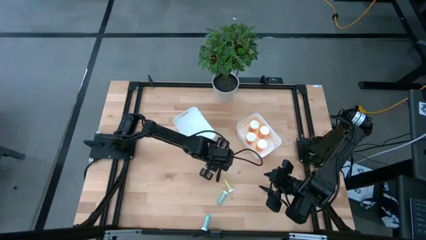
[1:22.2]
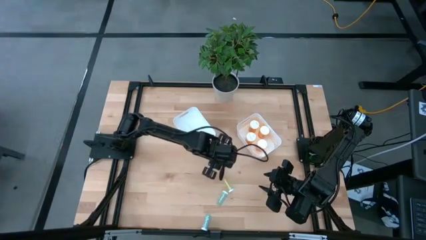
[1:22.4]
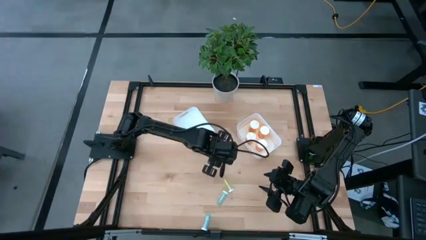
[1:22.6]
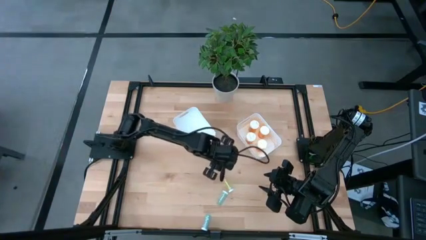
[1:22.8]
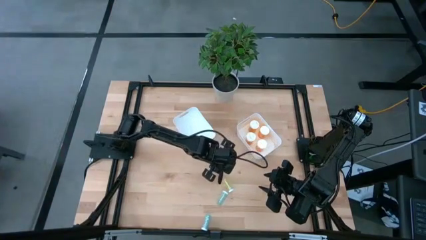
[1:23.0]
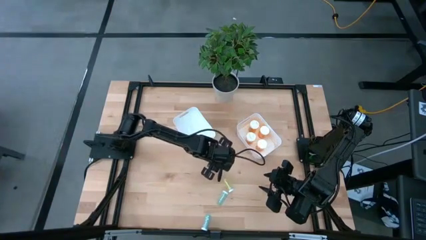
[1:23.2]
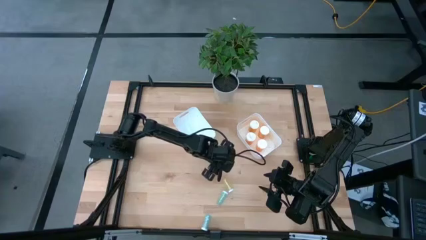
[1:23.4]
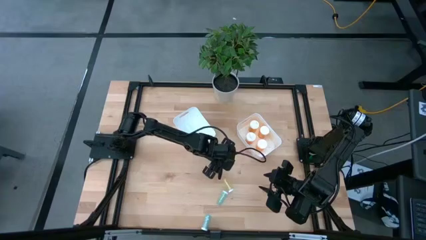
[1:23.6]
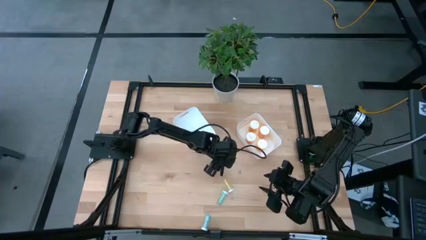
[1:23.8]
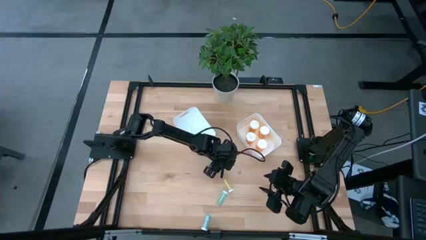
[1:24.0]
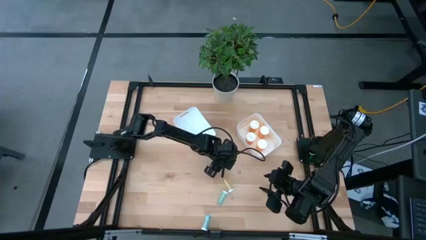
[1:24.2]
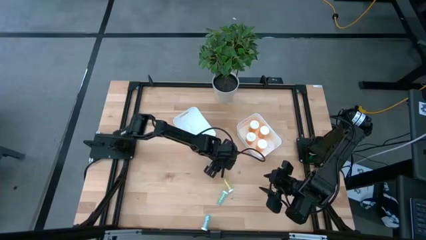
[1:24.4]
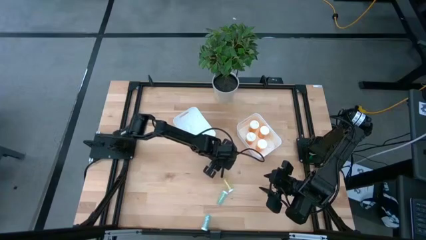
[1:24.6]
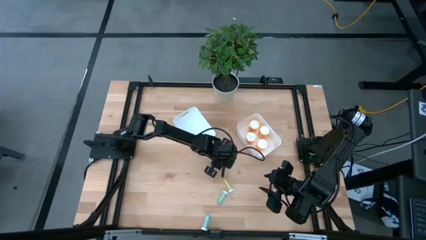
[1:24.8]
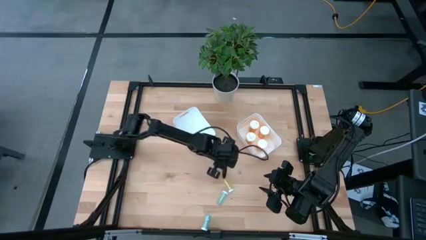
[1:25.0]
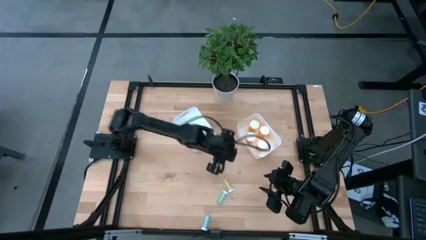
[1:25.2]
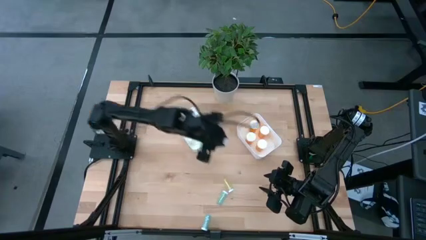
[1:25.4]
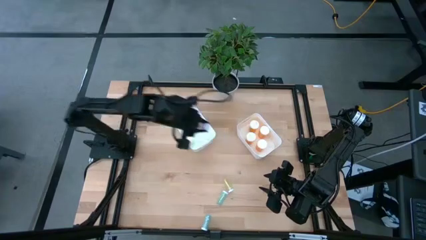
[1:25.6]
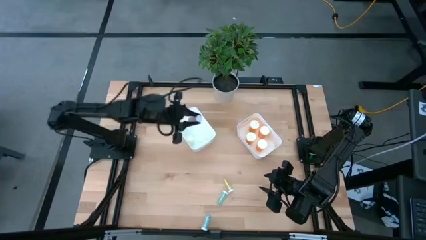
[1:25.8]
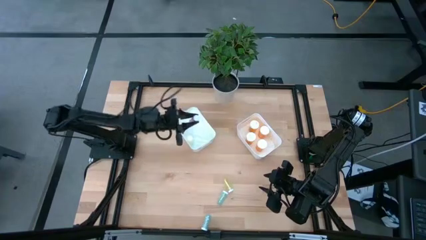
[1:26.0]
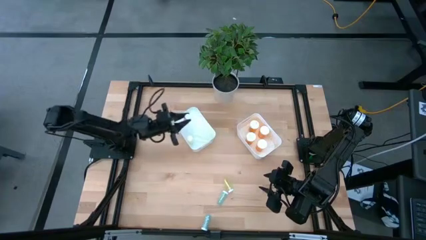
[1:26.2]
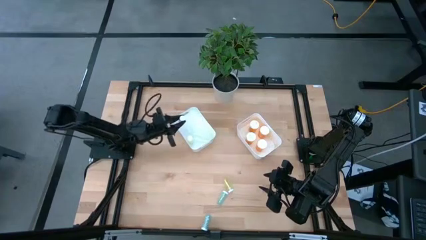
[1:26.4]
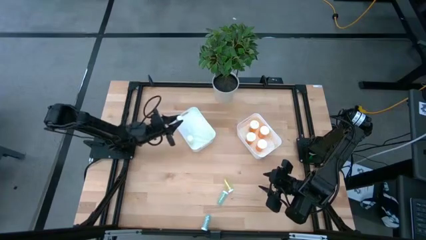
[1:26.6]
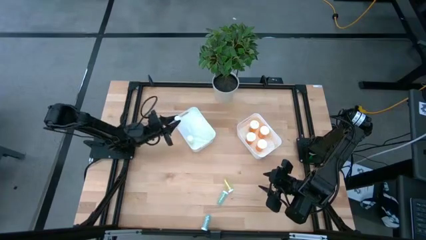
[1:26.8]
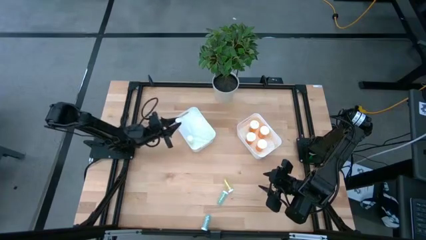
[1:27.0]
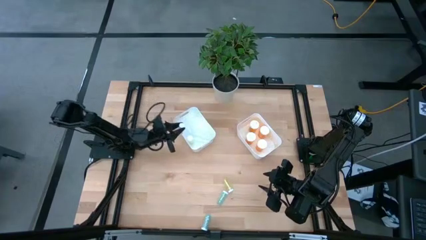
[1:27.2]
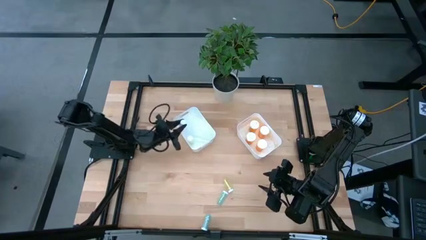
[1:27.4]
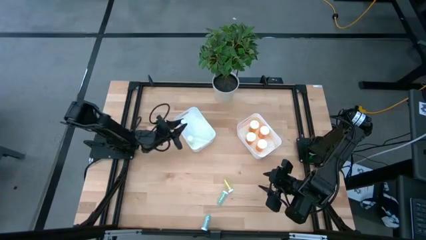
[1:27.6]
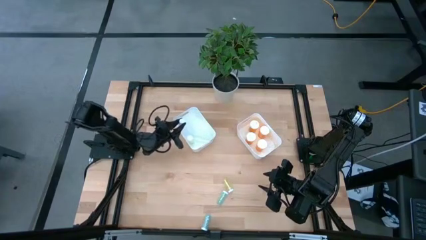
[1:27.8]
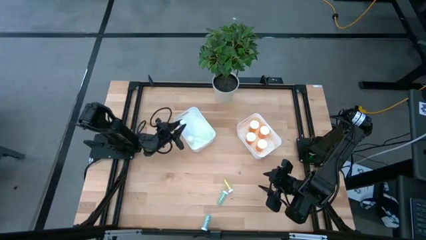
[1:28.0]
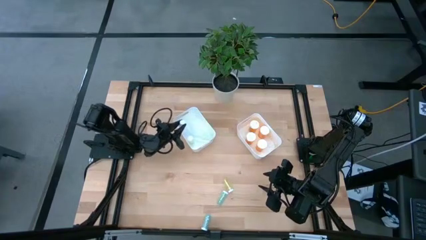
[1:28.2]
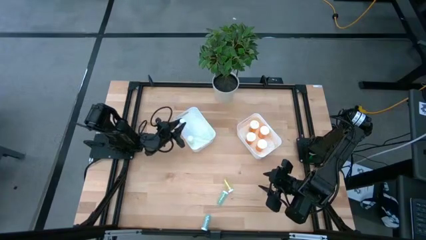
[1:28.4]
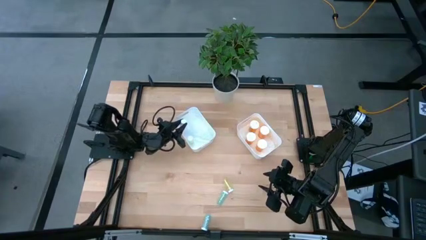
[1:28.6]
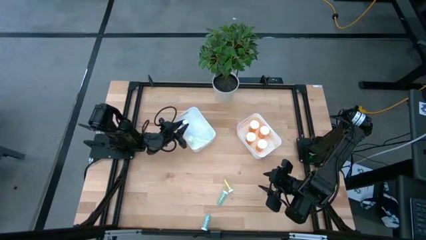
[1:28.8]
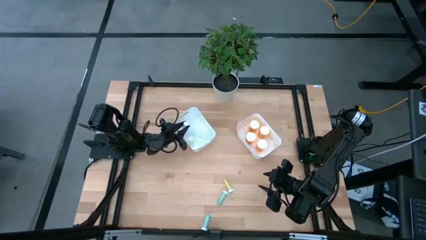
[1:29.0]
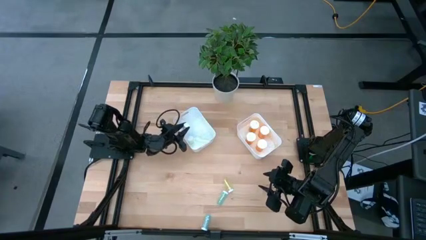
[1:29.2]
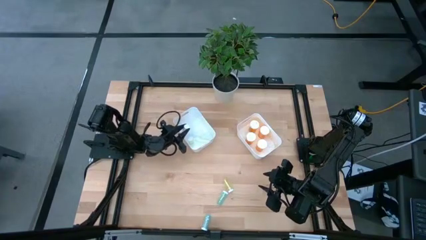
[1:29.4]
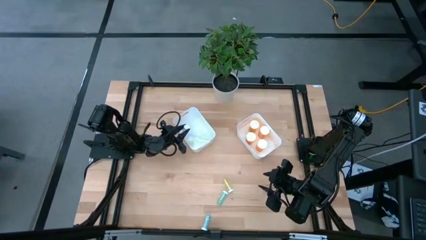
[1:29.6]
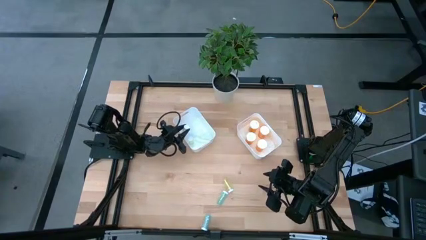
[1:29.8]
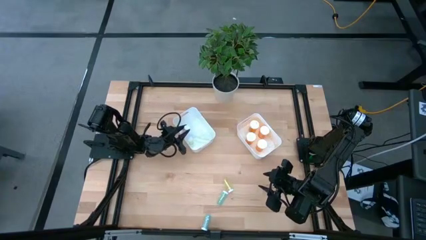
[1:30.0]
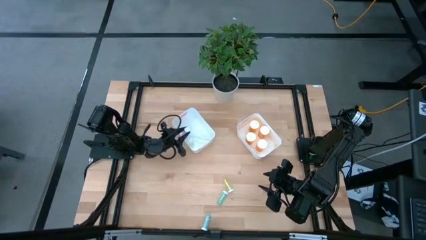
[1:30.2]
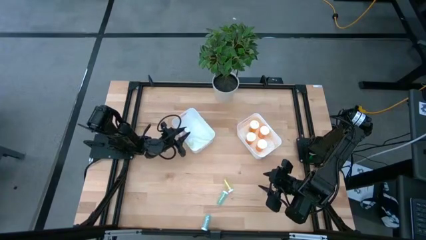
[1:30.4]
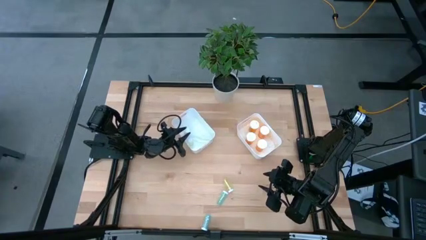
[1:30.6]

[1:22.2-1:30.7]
Task: Pick and place medicine bottles into bin by pill shape (circle, oval)
Put the pink pill bottle into the left white bin

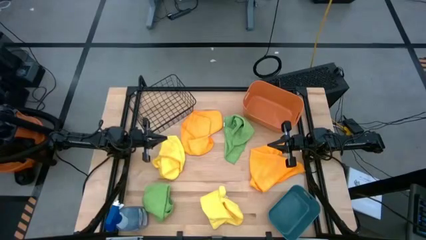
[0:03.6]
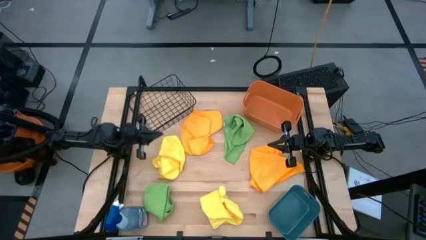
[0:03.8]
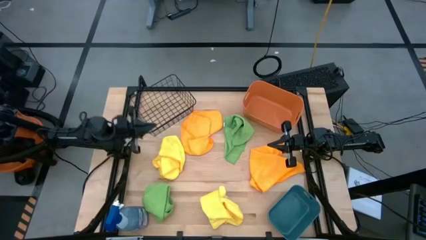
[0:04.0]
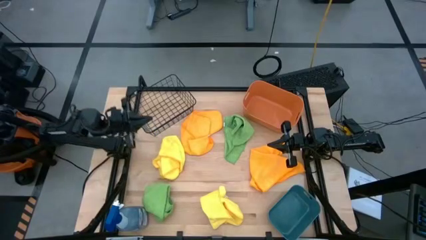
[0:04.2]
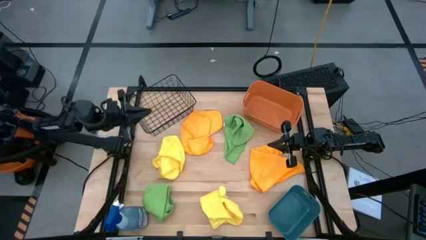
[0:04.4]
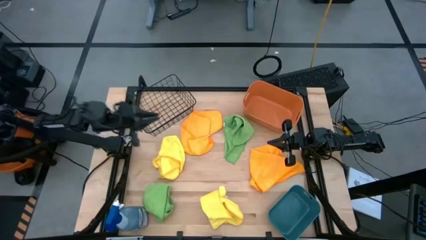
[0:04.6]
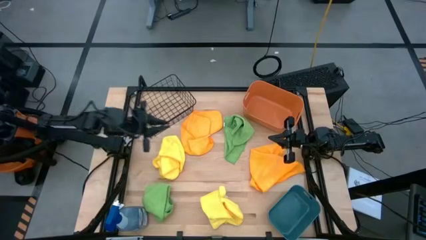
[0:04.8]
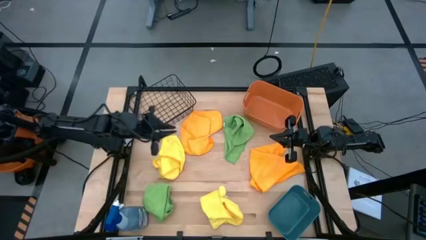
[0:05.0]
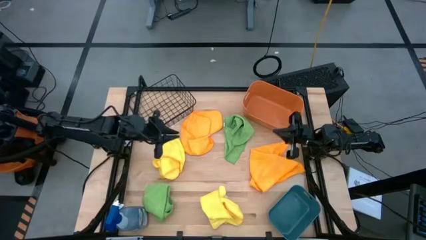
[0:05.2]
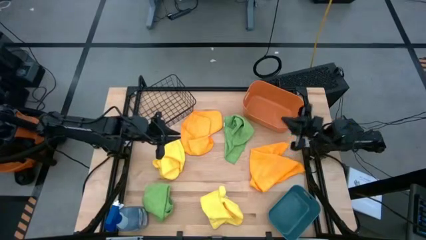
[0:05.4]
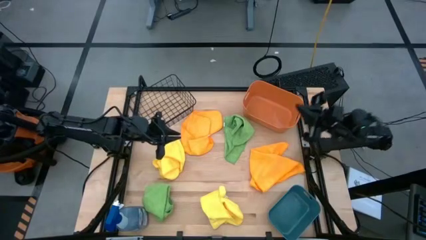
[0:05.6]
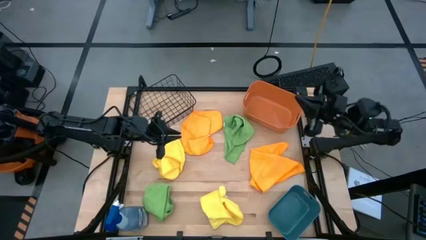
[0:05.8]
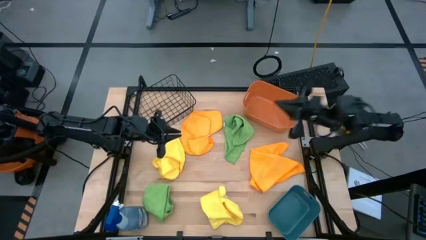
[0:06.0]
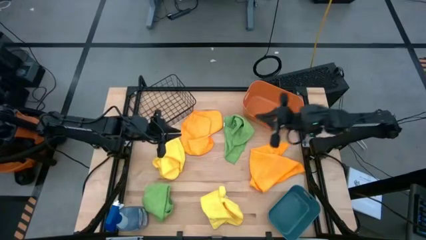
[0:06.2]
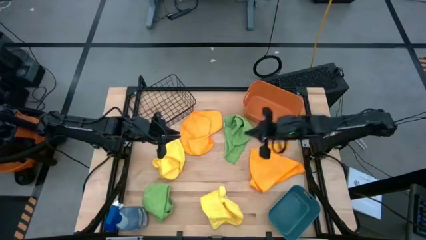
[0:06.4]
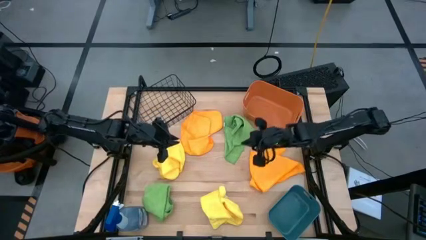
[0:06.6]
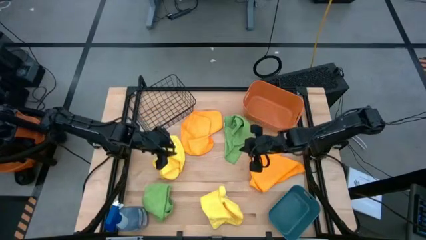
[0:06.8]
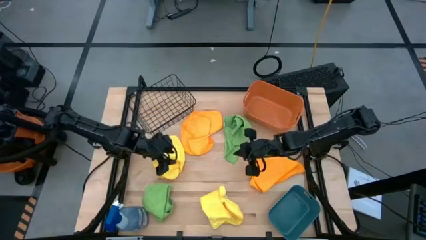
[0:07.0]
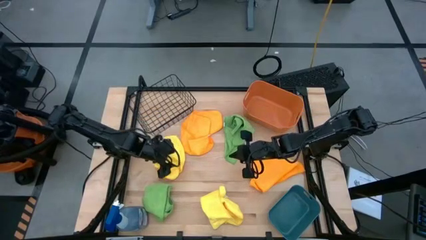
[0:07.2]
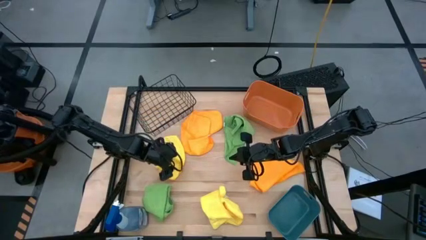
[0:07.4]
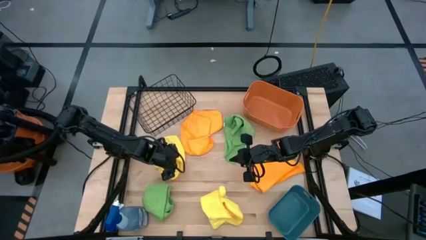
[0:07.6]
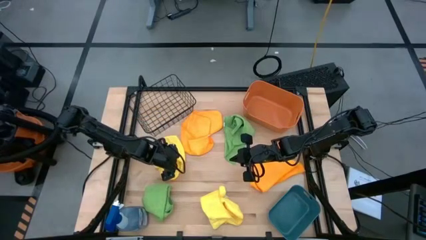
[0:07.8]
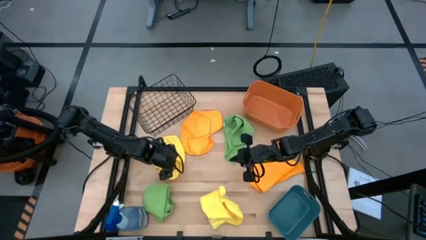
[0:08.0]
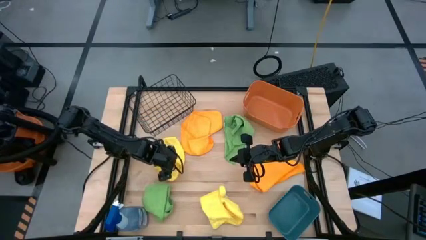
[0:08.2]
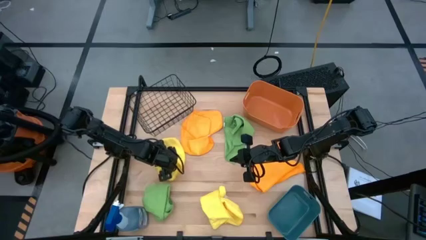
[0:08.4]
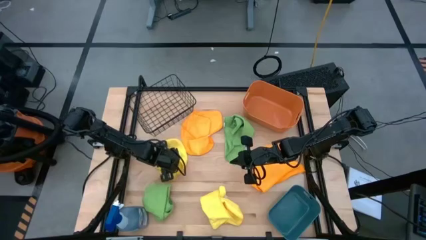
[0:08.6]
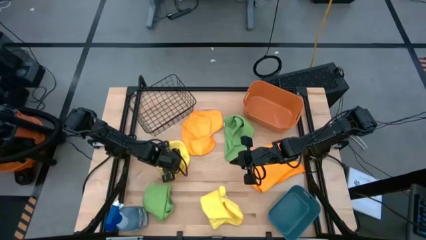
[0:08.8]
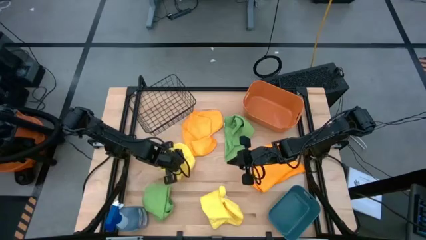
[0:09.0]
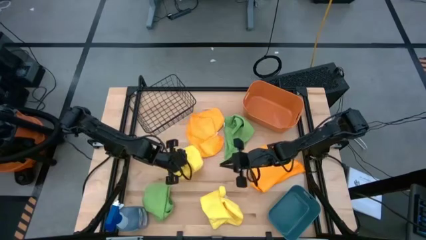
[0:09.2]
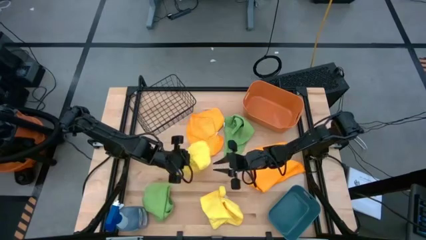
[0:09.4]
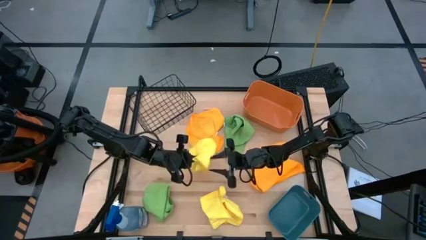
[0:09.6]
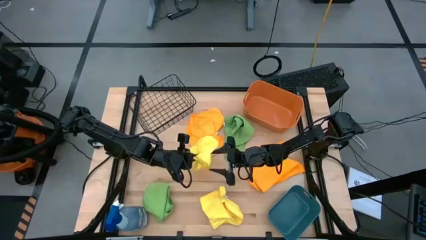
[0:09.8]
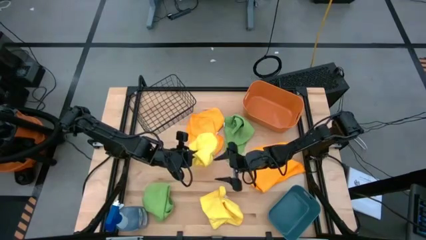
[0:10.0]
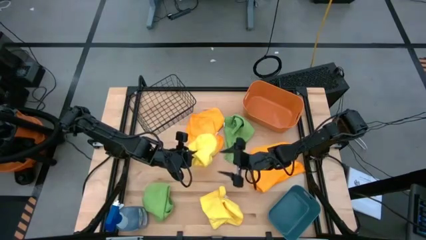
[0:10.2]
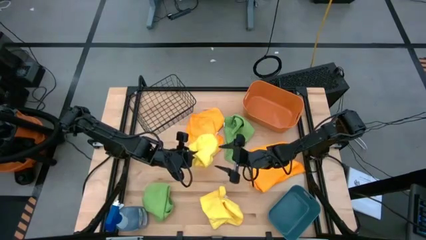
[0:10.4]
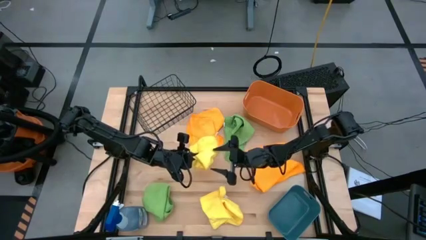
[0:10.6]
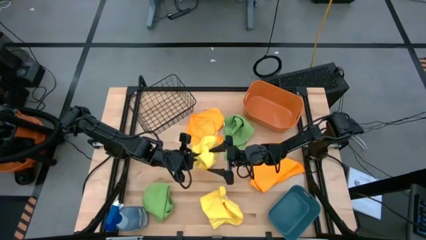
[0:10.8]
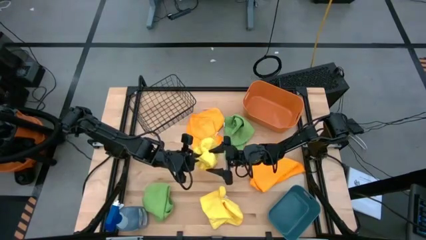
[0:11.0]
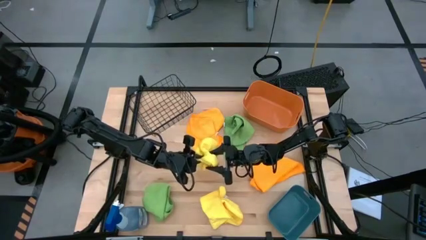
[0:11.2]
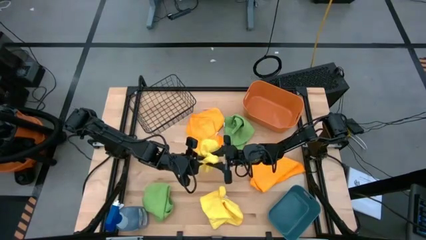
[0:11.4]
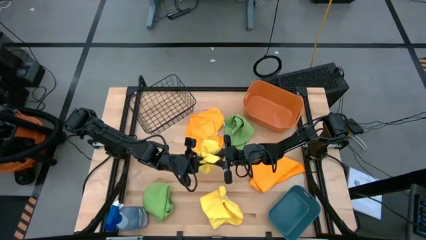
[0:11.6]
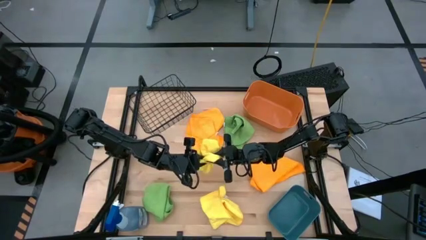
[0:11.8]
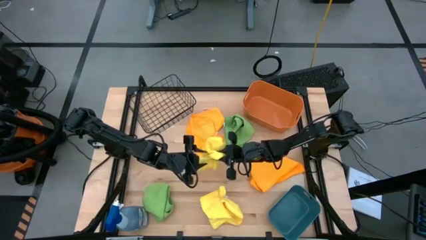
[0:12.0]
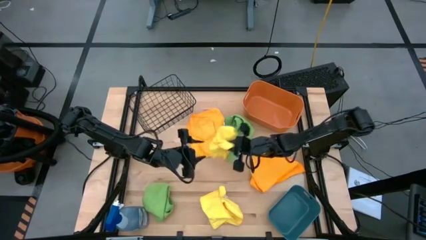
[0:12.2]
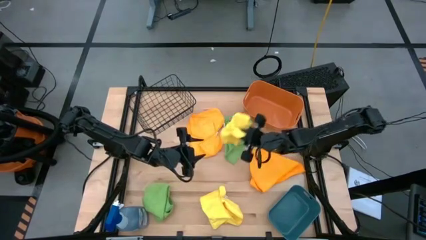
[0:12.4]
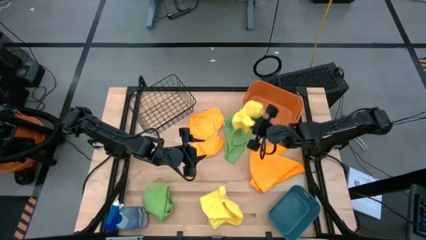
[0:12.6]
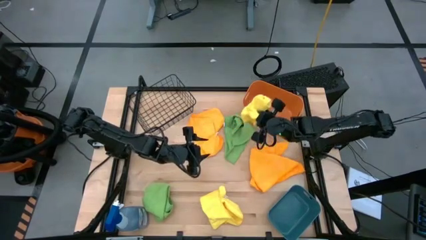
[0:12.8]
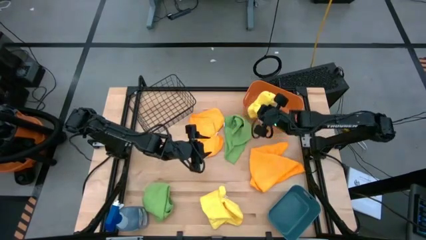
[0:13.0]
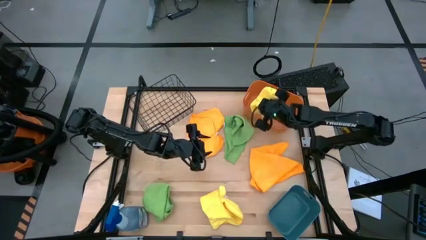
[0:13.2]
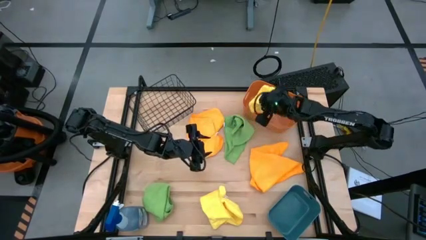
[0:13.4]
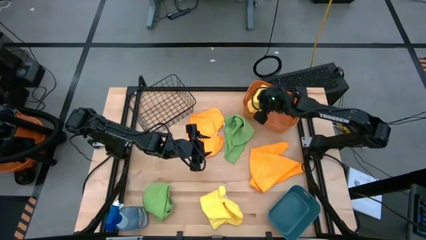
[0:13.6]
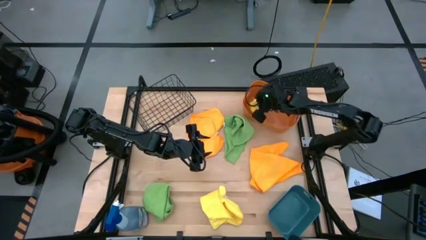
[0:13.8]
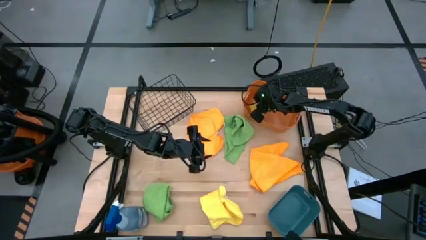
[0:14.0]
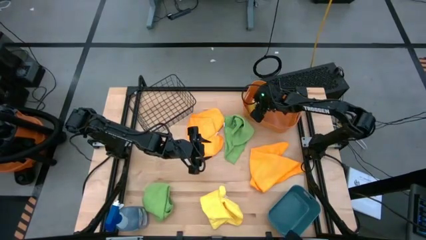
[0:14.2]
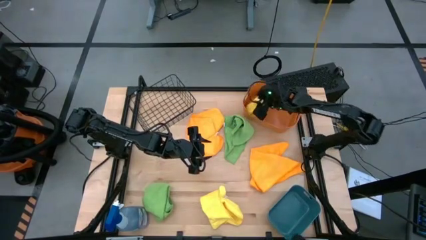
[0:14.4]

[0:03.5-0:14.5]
Task: Sort microfiber towel by color & place in baskets
Put the top yellow microfiber cloth into the orange bin
